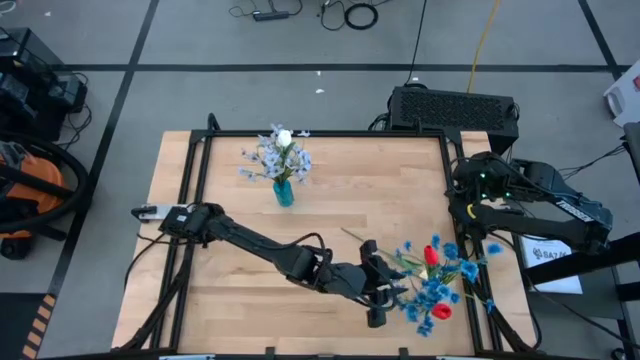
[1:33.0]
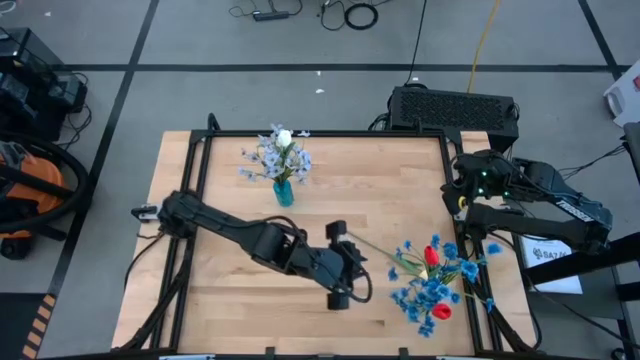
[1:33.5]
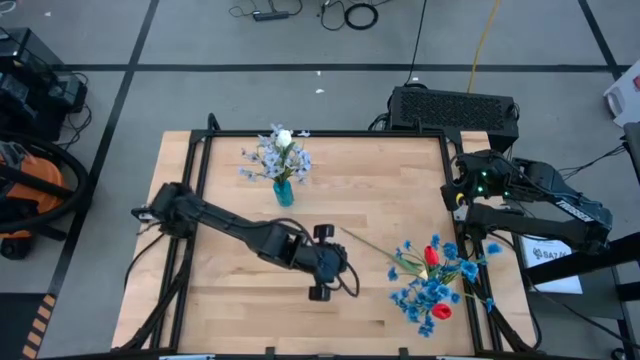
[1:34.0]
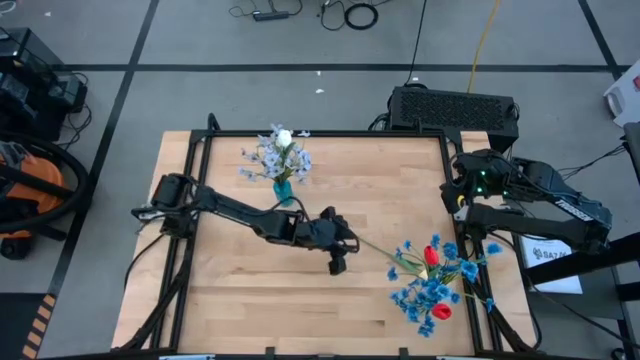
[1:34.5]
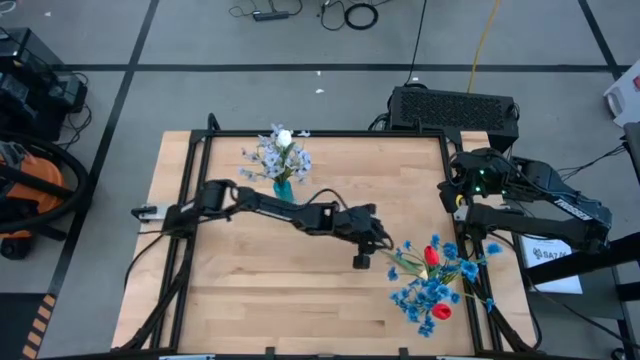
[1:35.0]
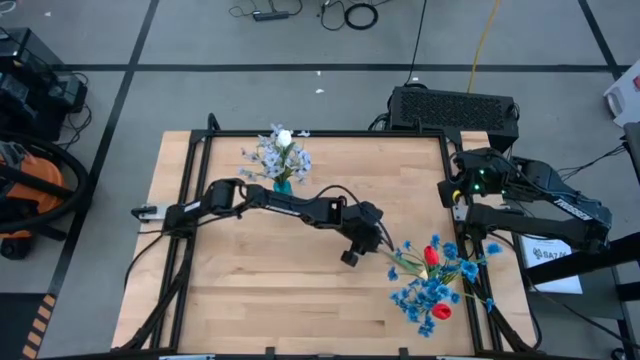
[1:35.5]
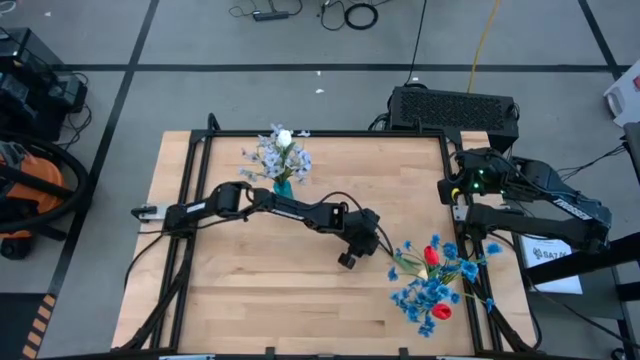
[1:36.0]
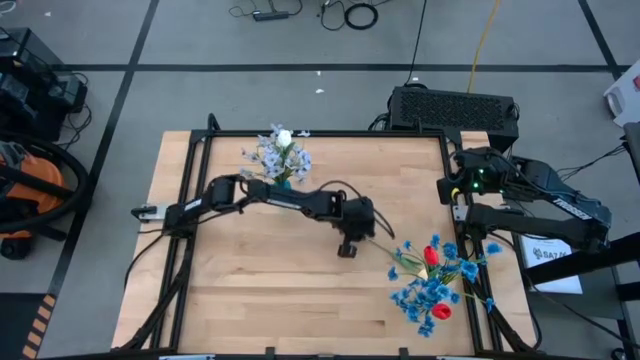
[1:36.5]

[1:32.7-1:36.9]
Task: Sort flowers into vase by color
Put the orange tulip into the blue transparent vase

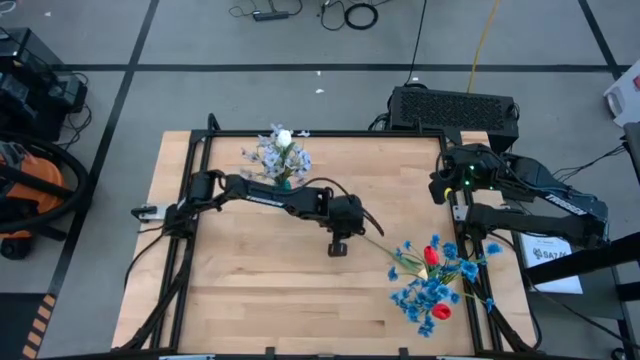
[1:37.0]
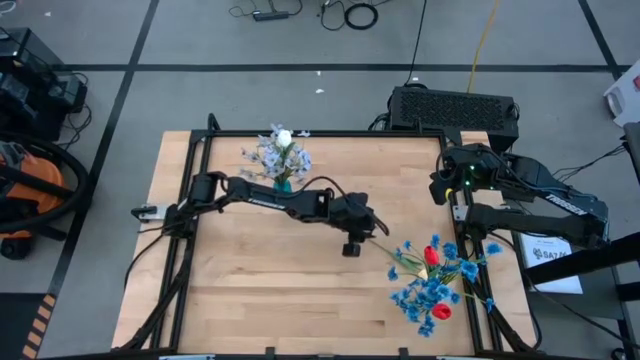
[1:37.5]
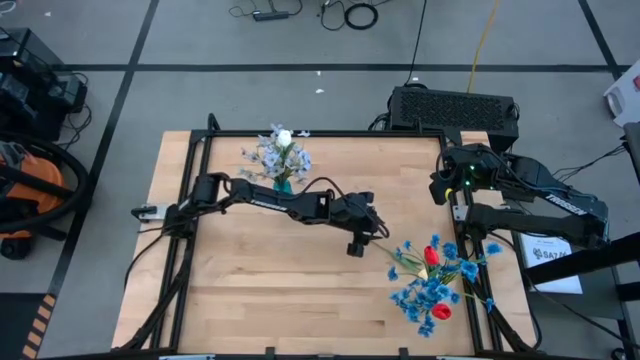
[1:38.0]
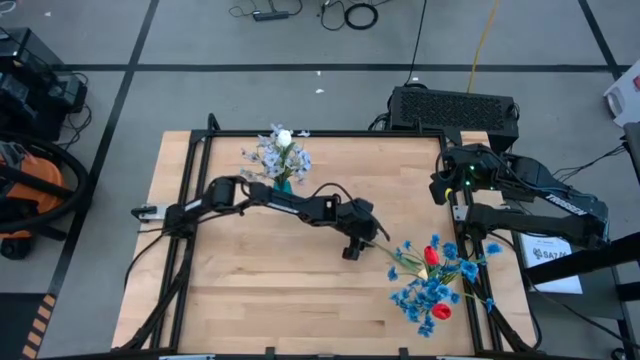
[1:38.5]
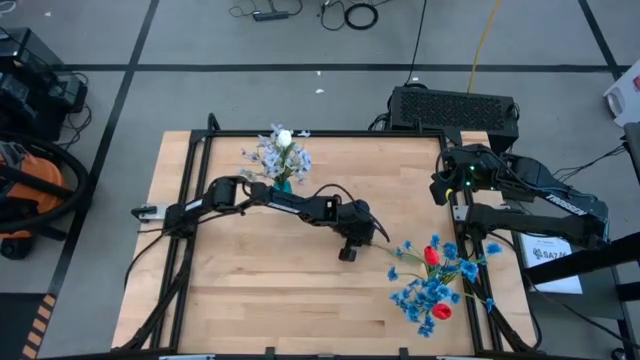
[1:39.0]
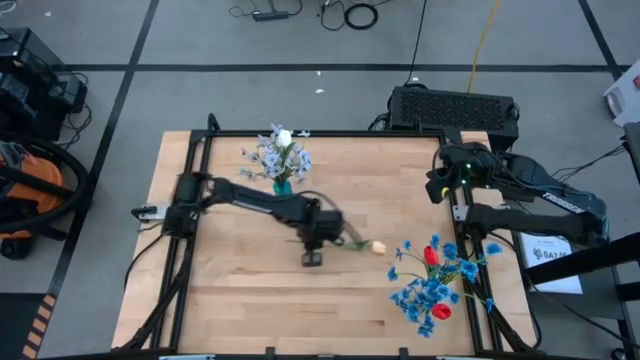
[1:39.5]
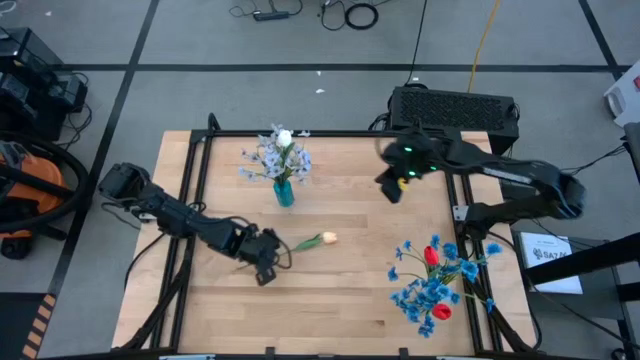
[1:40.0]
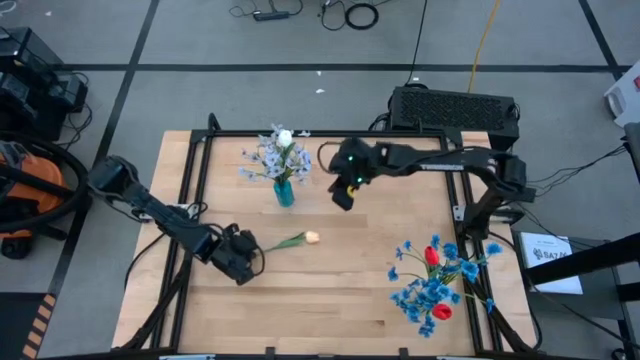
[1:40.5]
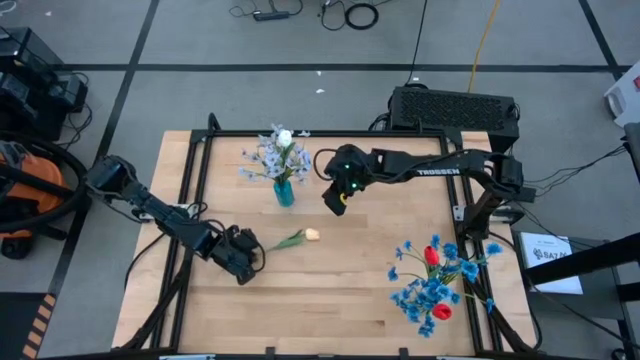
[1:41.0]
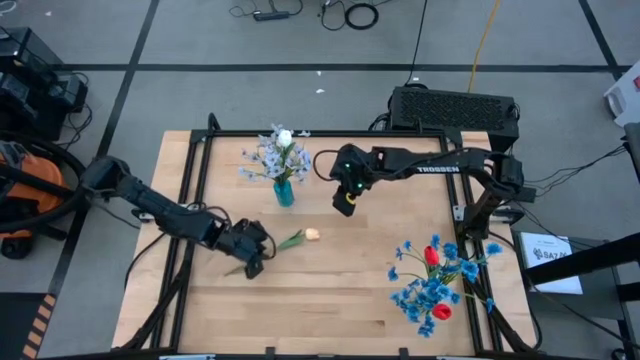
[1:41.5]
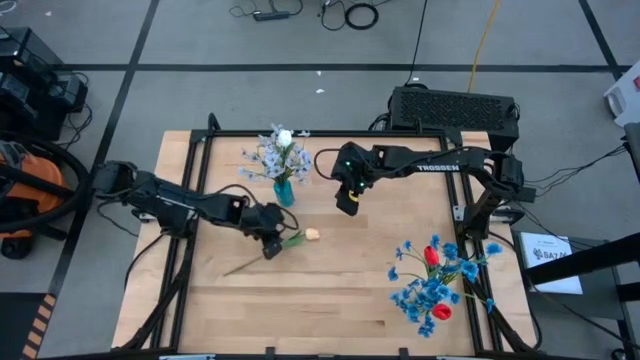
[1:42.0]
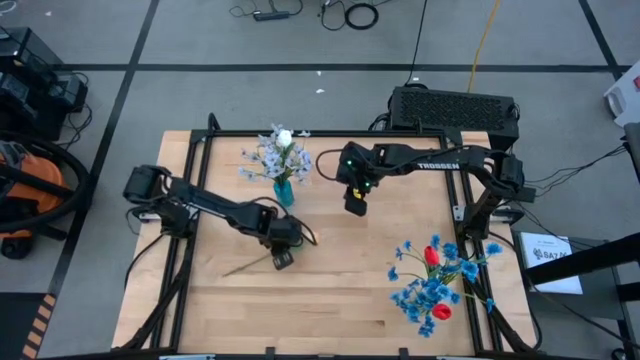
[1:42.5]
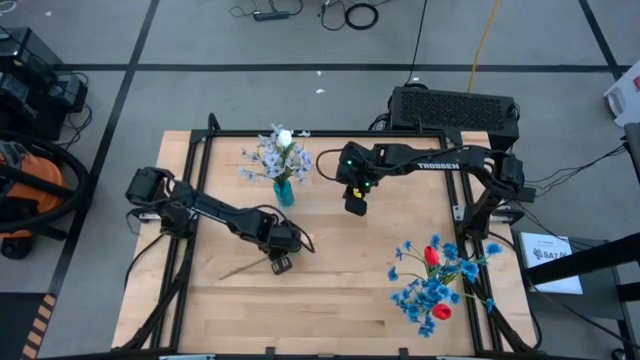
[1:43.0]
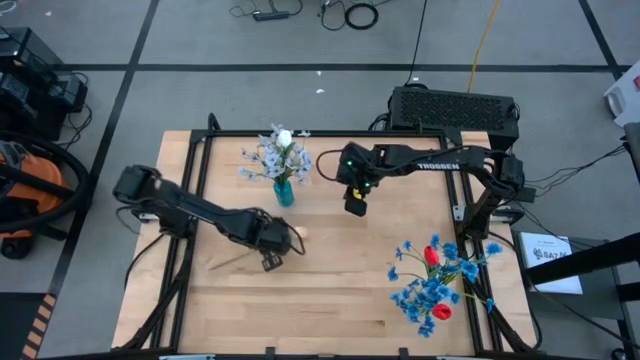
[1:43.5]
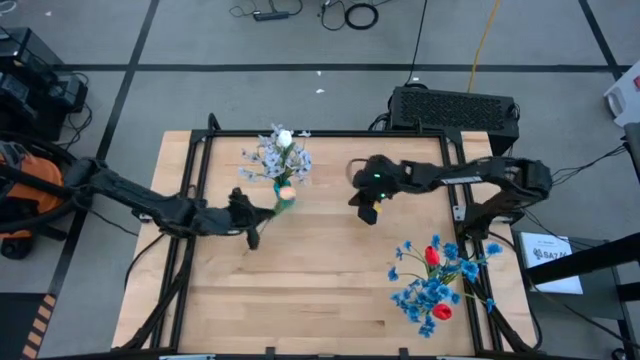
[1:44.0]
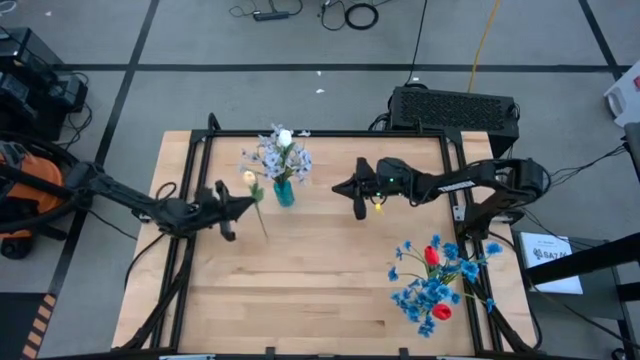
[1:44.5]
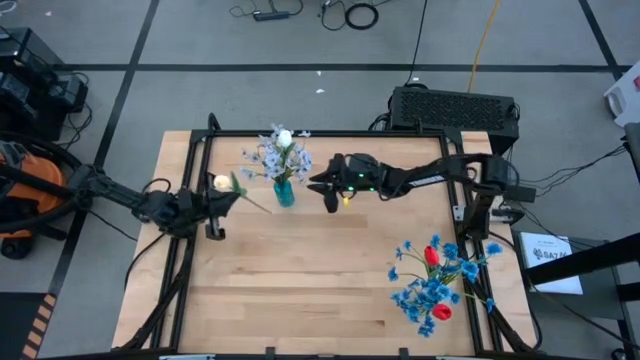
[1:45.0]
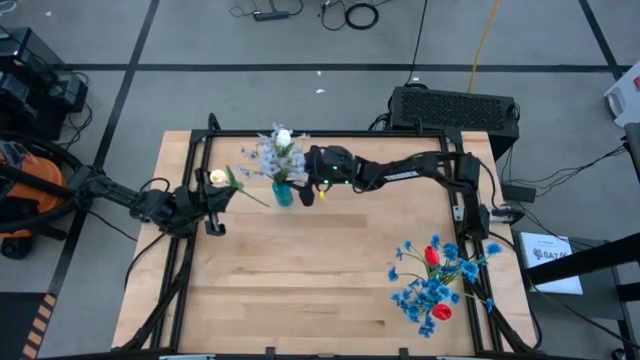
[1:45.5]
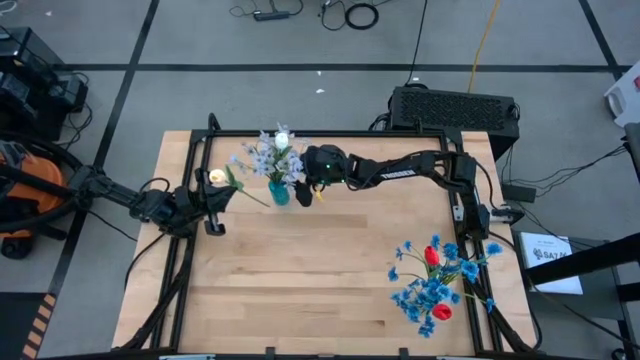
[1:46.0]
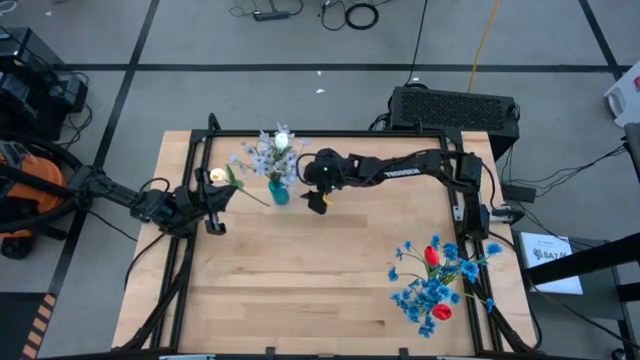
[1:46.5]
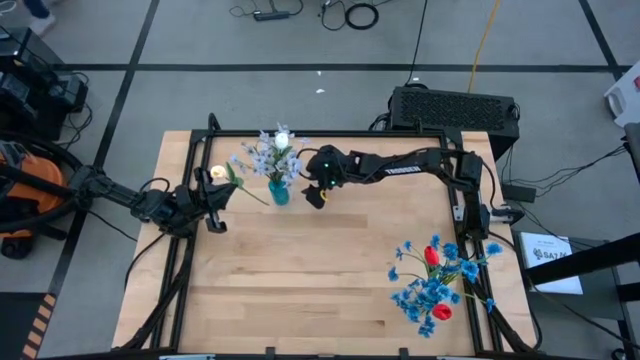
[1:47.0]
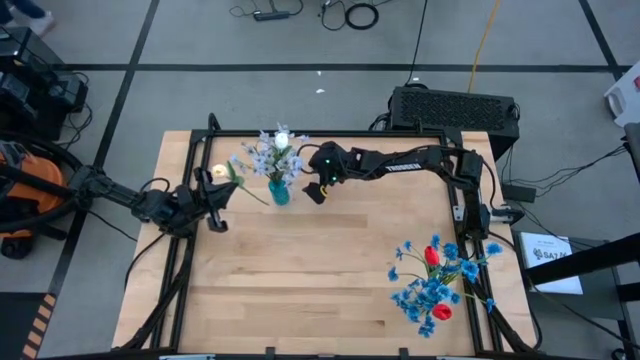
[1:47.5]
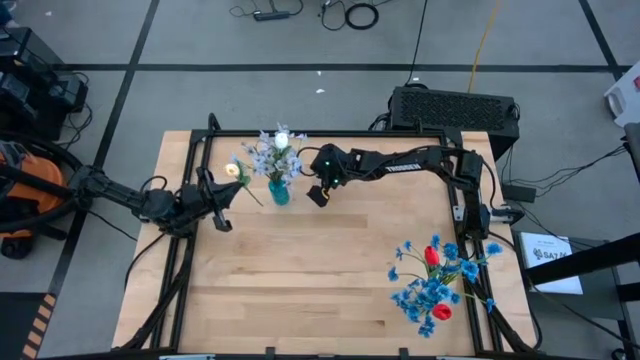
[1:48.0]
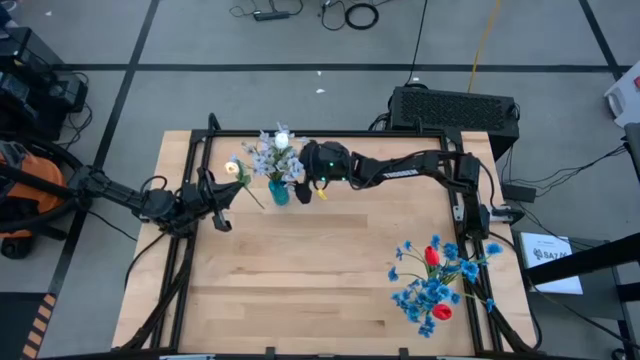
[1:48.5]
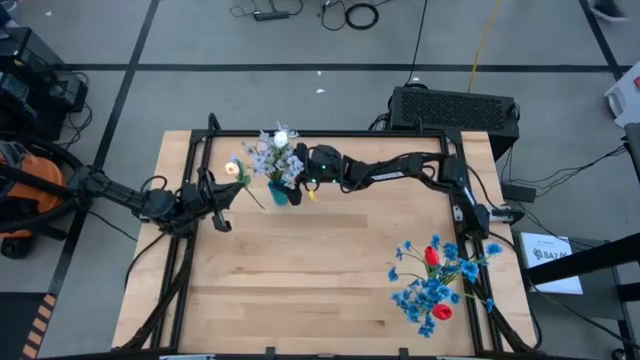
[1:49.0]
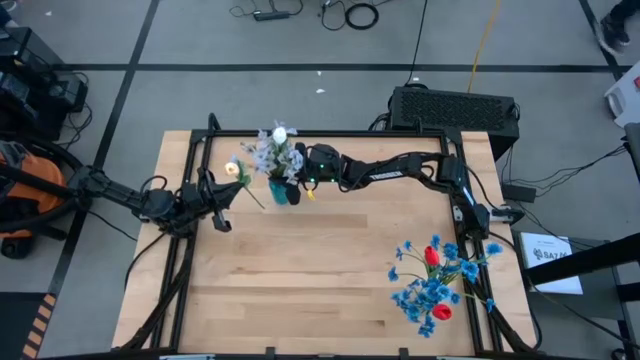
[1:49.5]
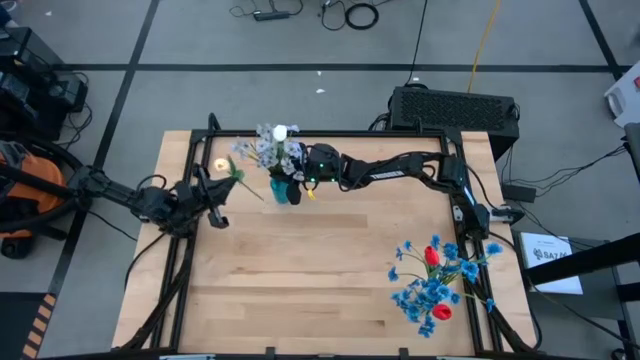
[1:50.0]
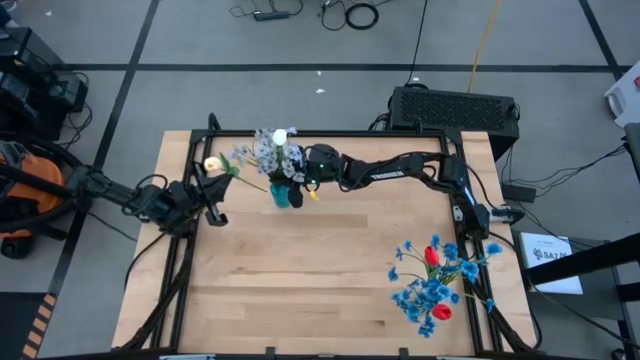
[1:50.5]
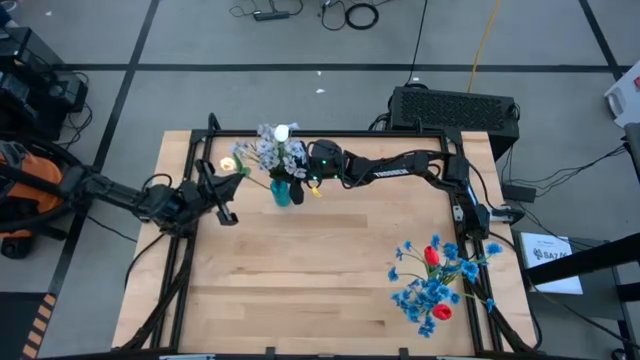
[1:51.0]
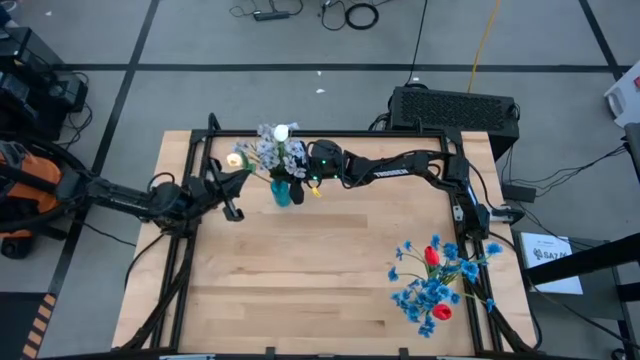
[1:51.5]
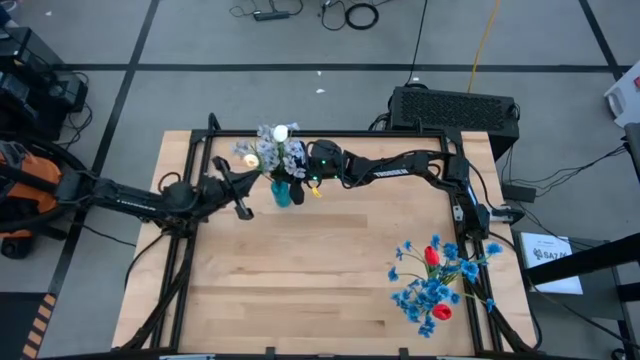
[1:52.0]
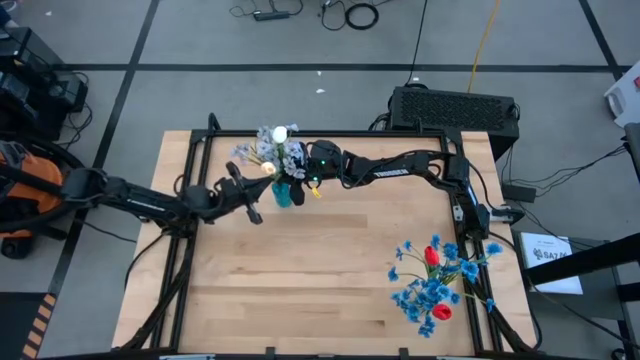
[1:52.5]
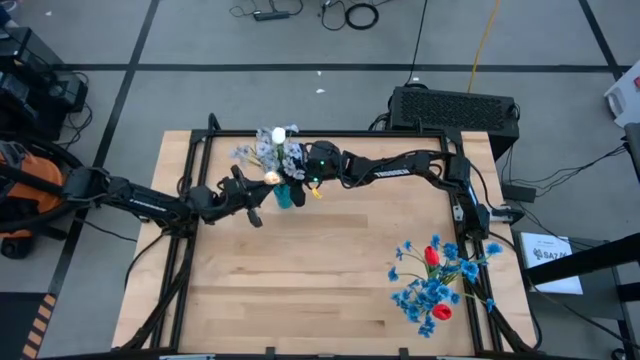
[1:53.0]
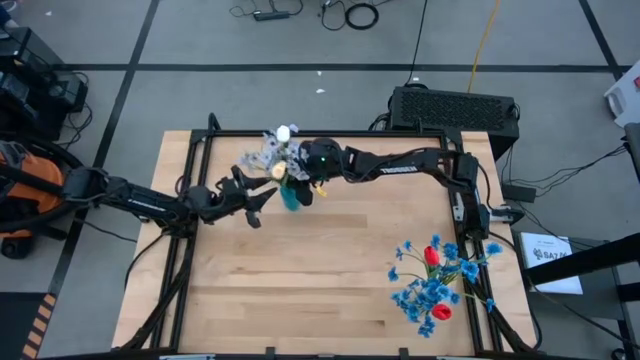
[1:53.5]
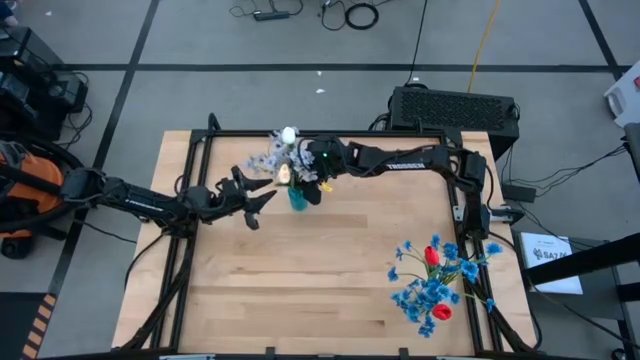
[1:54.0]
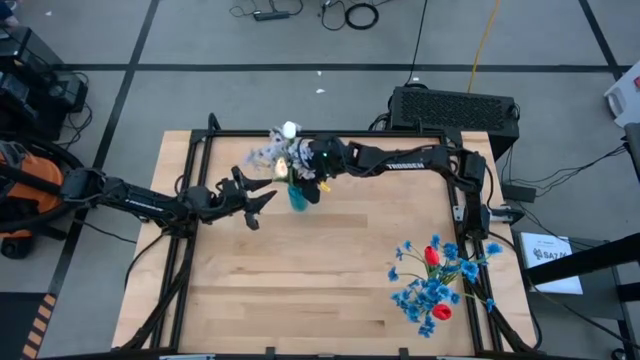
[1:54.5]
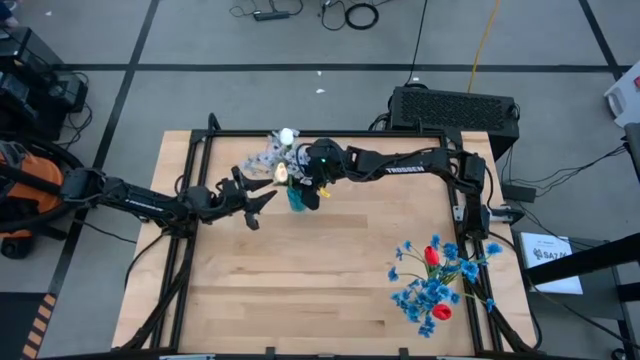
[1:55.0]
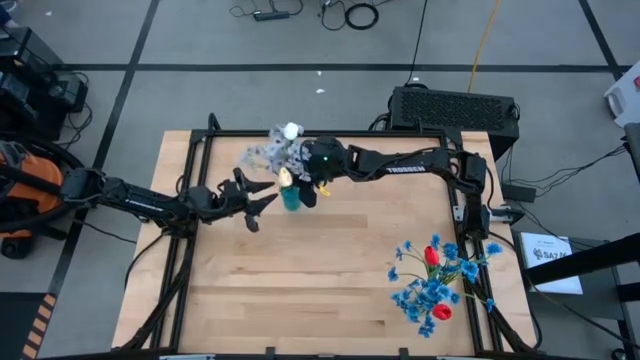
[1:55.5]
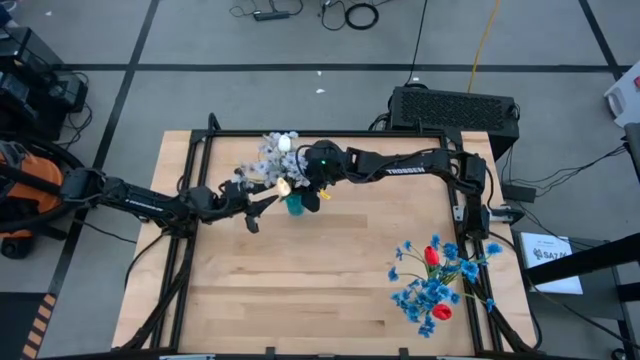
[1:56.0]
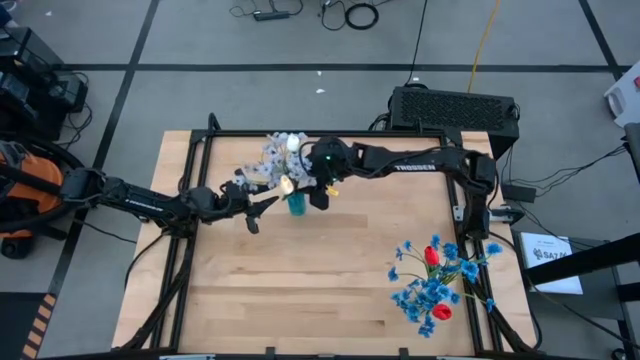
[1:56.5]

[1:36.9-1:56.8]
Put the orange tulip into the blue transparent vase
